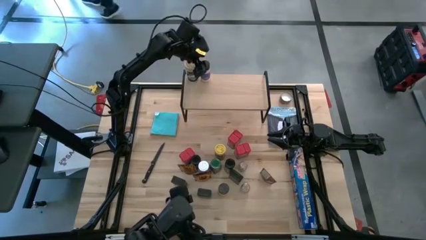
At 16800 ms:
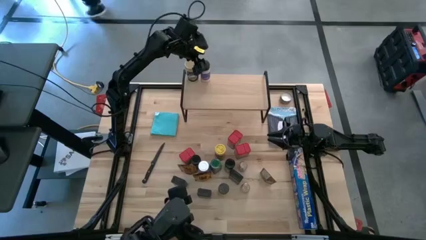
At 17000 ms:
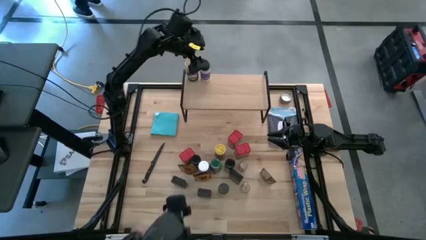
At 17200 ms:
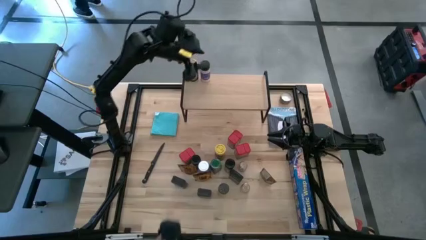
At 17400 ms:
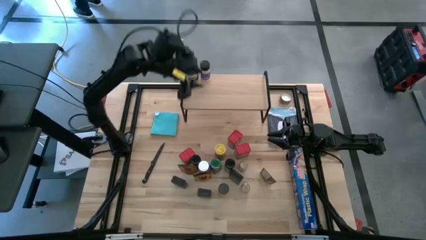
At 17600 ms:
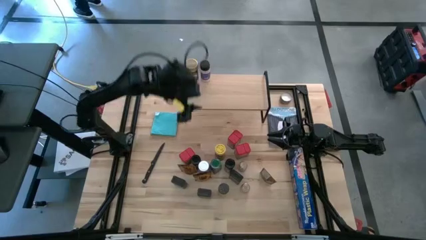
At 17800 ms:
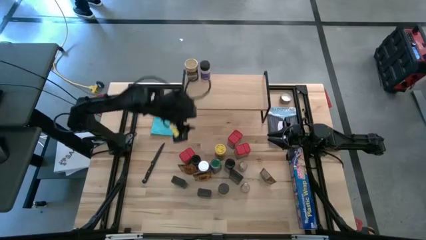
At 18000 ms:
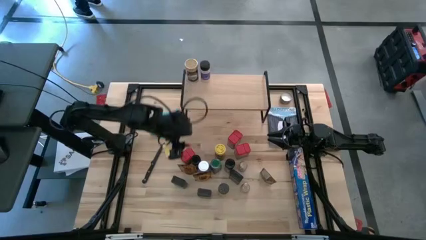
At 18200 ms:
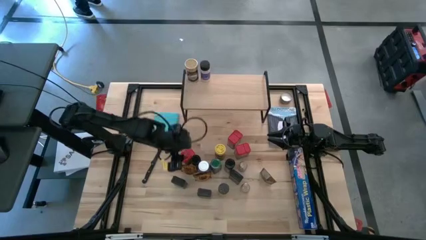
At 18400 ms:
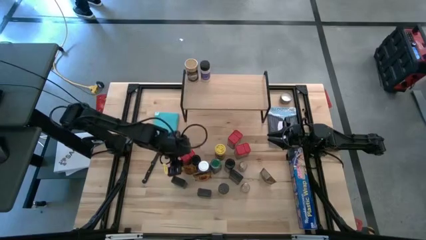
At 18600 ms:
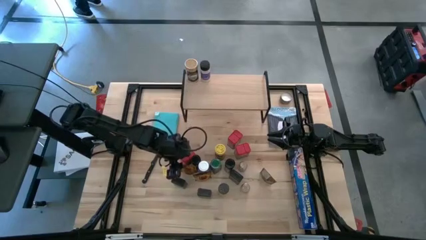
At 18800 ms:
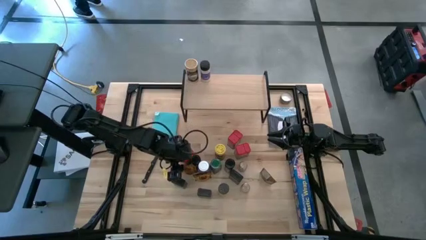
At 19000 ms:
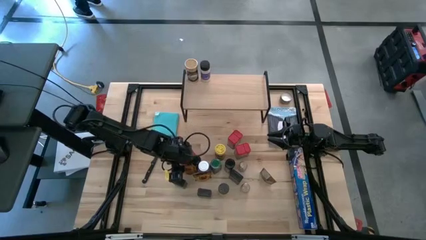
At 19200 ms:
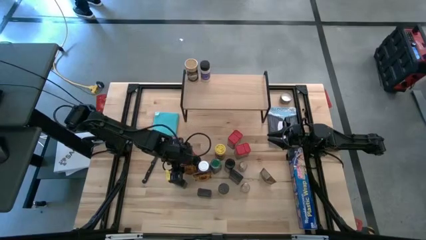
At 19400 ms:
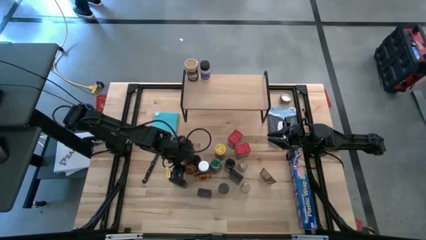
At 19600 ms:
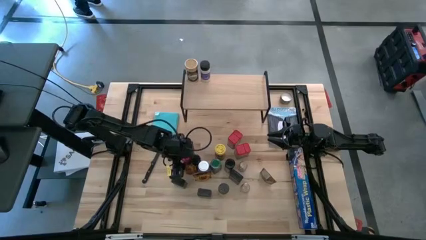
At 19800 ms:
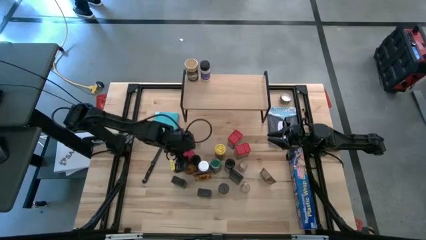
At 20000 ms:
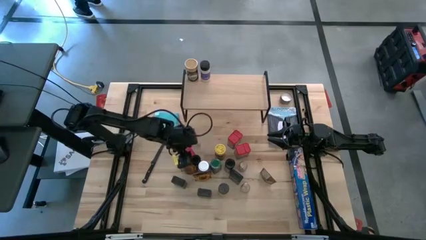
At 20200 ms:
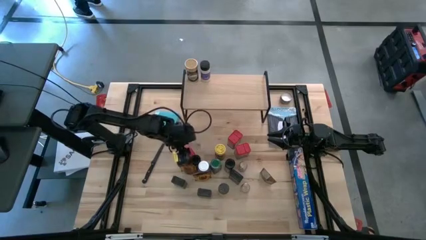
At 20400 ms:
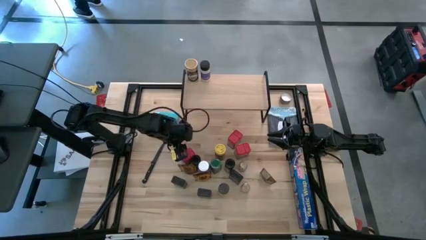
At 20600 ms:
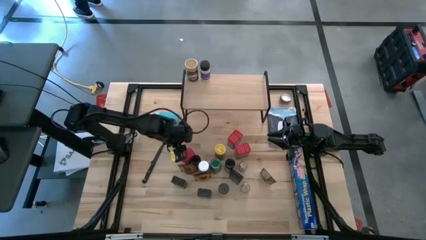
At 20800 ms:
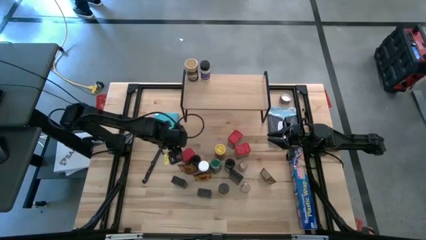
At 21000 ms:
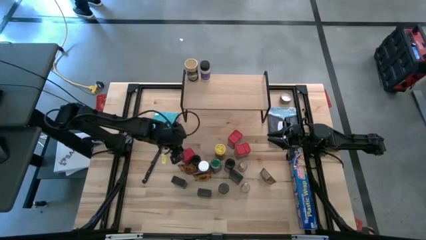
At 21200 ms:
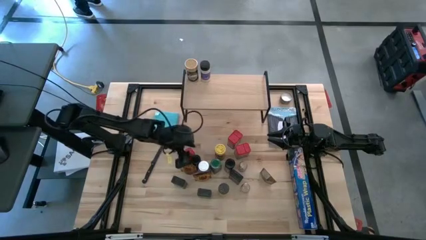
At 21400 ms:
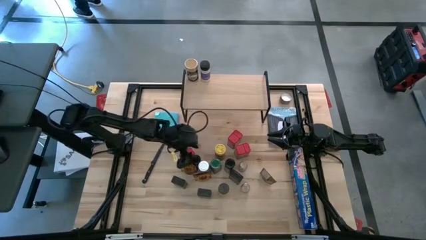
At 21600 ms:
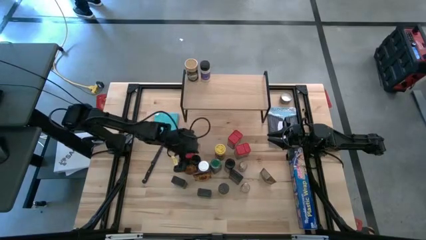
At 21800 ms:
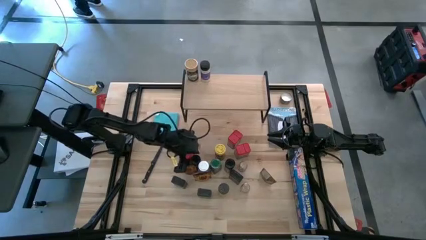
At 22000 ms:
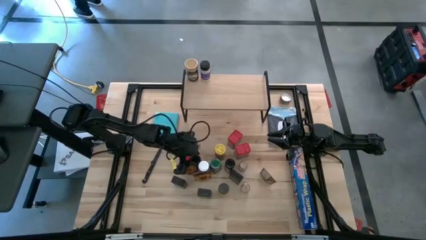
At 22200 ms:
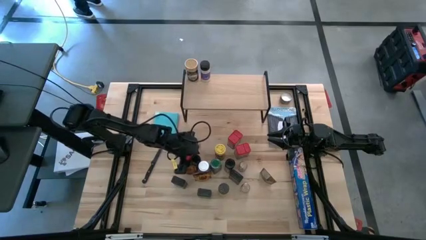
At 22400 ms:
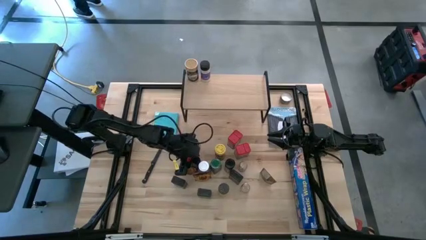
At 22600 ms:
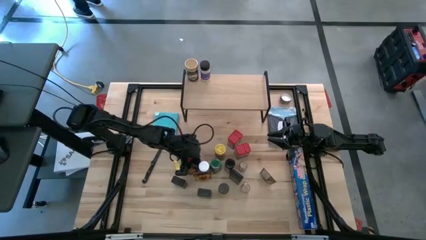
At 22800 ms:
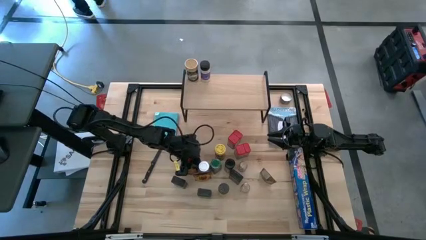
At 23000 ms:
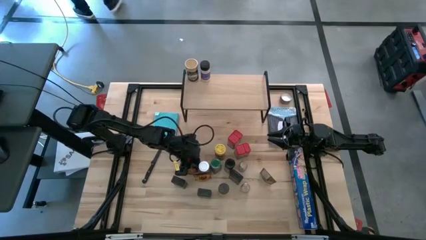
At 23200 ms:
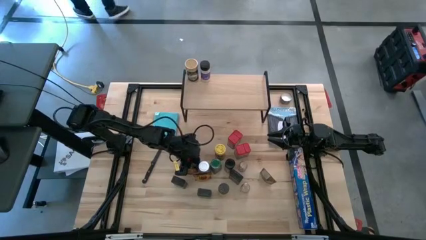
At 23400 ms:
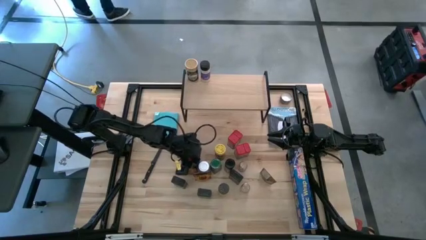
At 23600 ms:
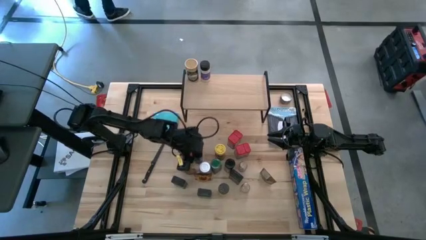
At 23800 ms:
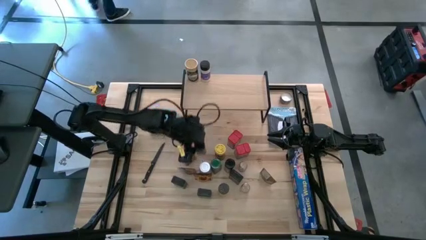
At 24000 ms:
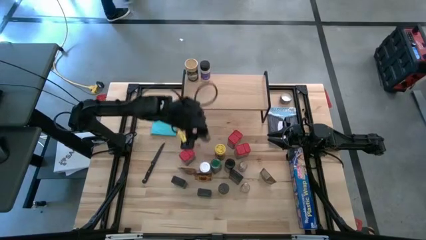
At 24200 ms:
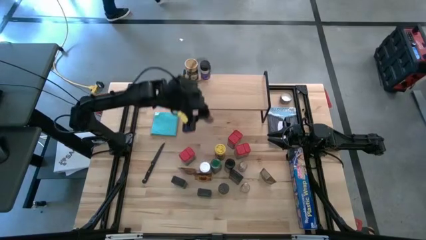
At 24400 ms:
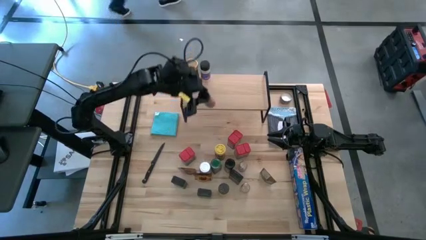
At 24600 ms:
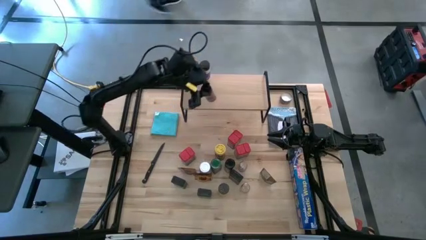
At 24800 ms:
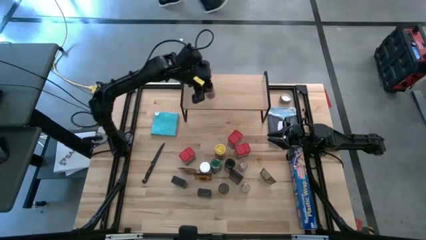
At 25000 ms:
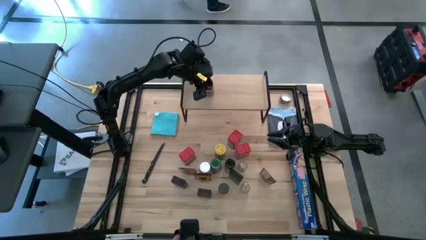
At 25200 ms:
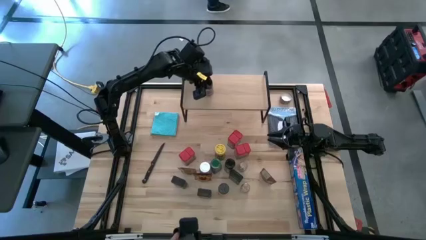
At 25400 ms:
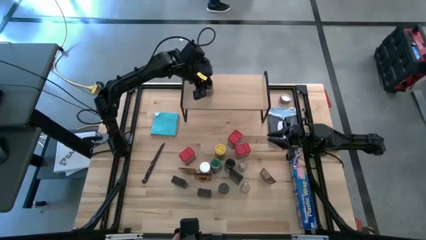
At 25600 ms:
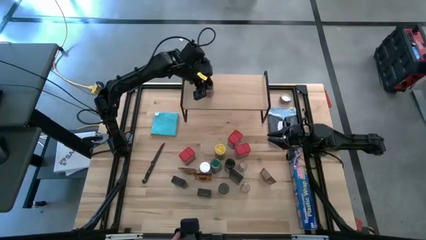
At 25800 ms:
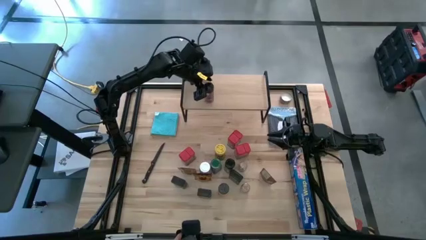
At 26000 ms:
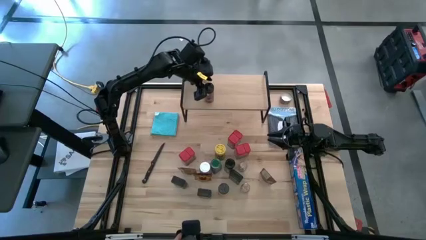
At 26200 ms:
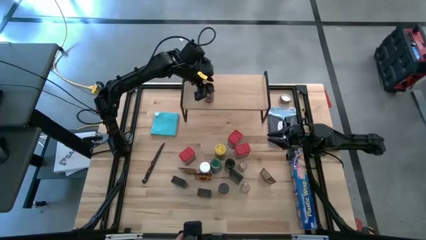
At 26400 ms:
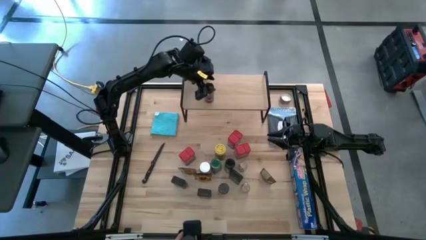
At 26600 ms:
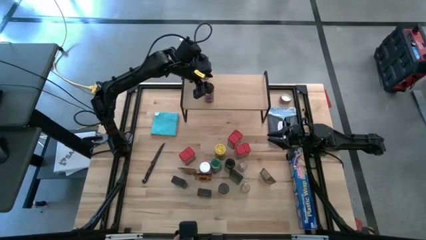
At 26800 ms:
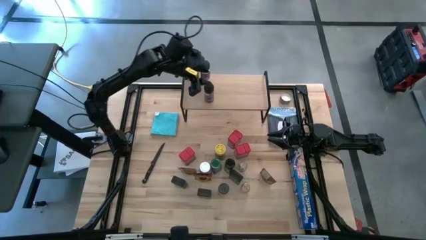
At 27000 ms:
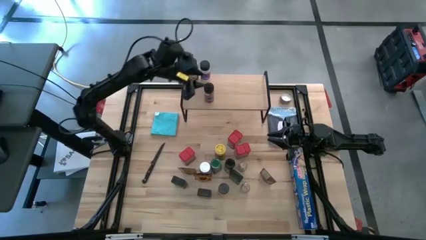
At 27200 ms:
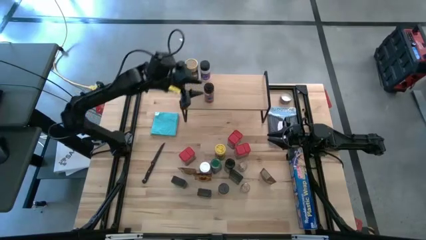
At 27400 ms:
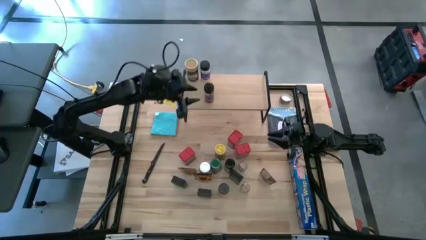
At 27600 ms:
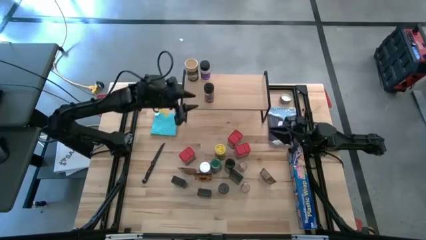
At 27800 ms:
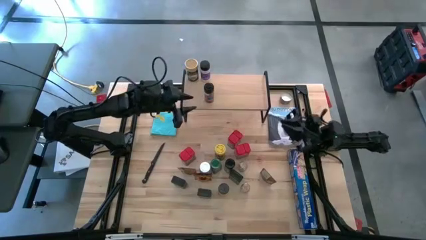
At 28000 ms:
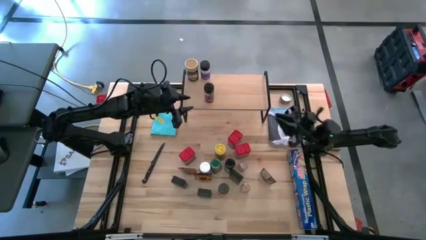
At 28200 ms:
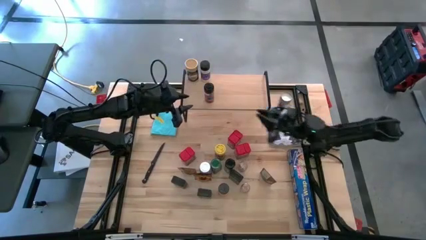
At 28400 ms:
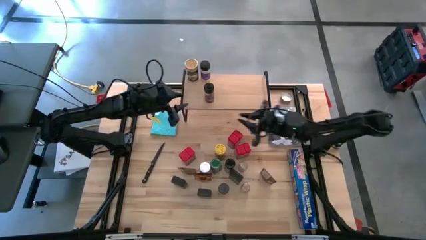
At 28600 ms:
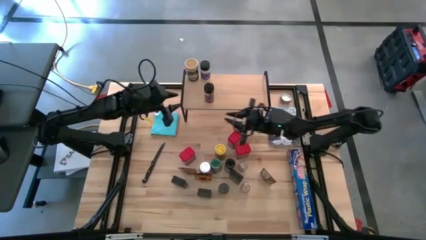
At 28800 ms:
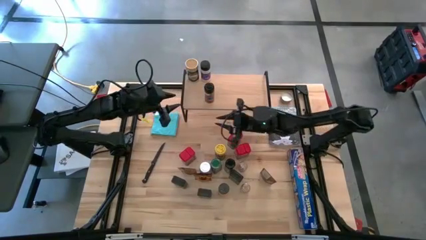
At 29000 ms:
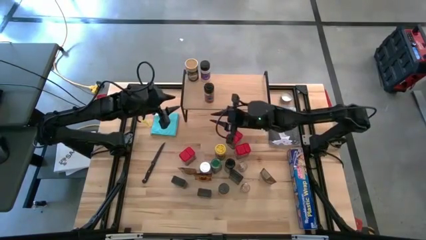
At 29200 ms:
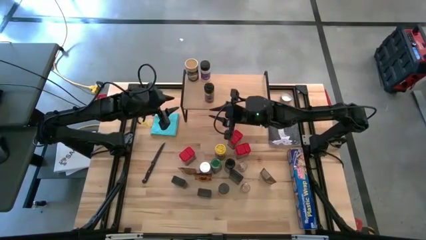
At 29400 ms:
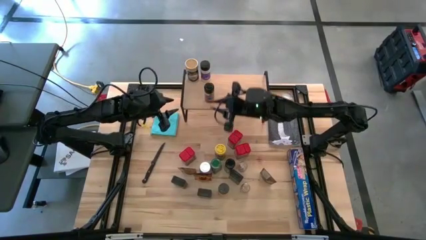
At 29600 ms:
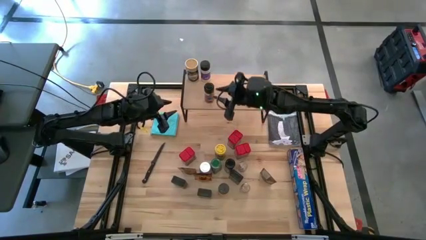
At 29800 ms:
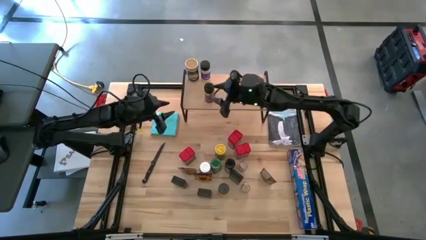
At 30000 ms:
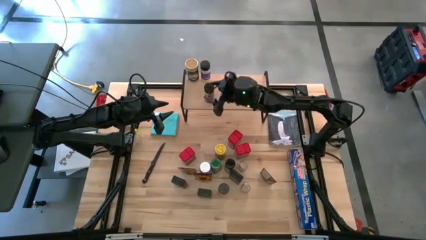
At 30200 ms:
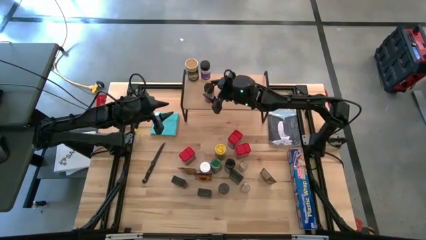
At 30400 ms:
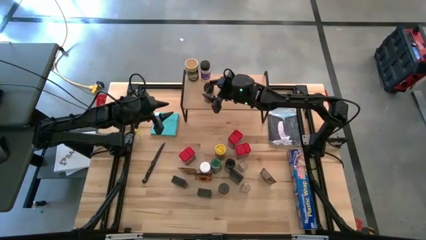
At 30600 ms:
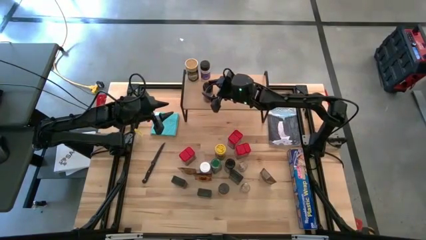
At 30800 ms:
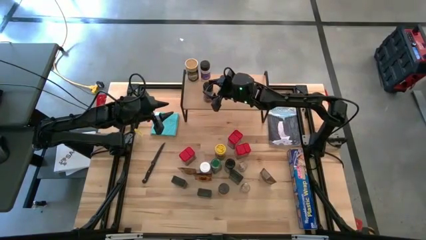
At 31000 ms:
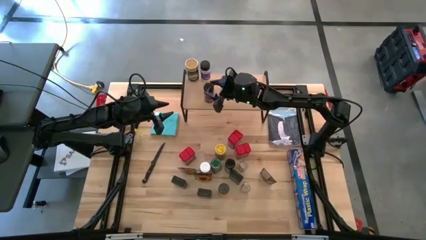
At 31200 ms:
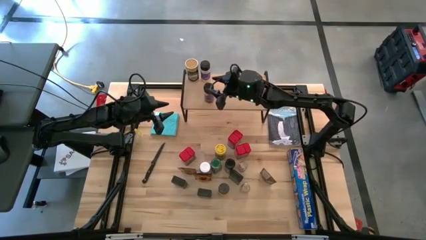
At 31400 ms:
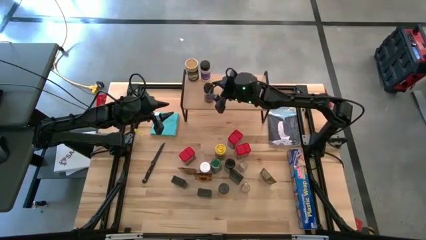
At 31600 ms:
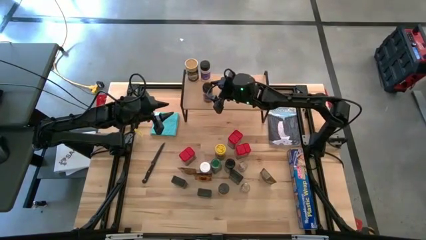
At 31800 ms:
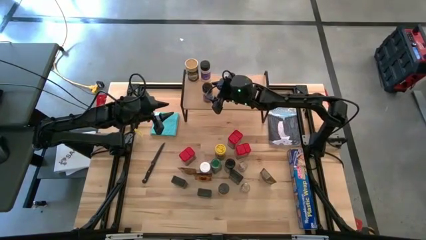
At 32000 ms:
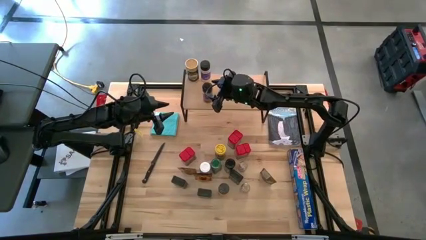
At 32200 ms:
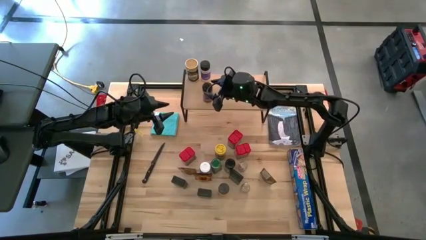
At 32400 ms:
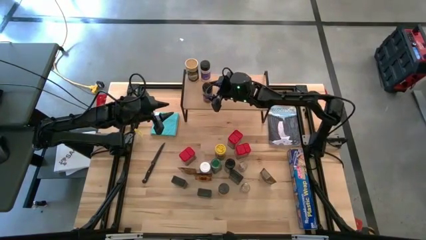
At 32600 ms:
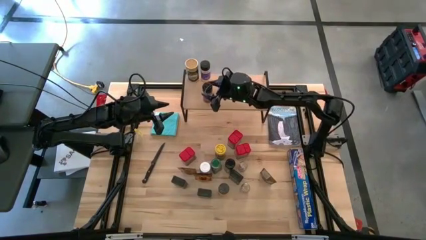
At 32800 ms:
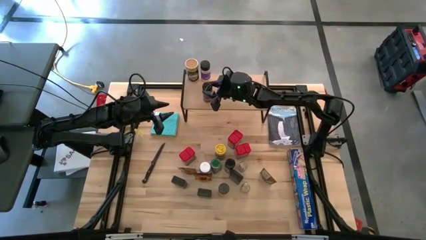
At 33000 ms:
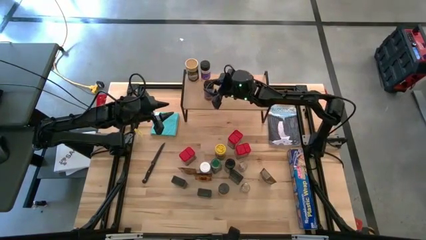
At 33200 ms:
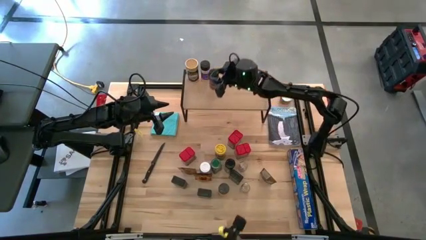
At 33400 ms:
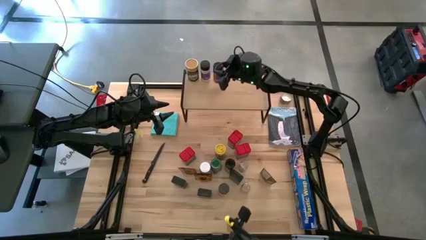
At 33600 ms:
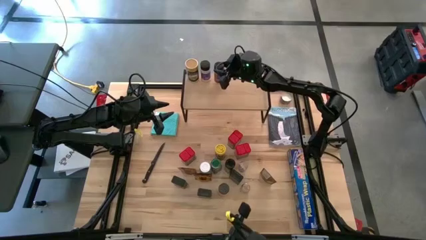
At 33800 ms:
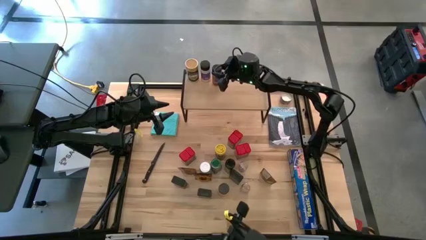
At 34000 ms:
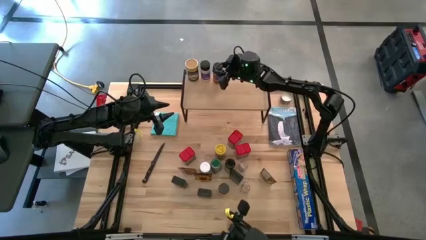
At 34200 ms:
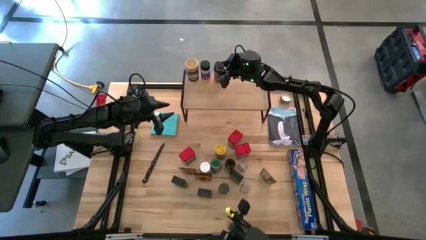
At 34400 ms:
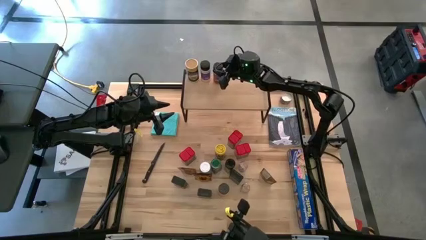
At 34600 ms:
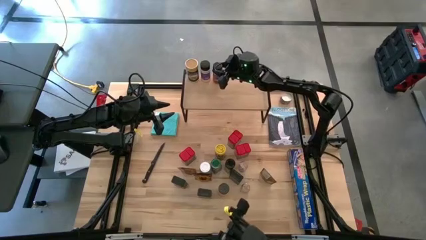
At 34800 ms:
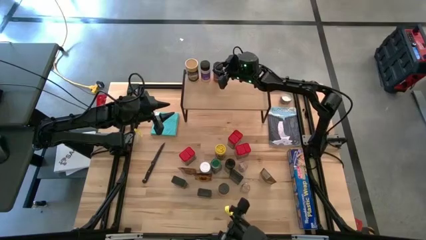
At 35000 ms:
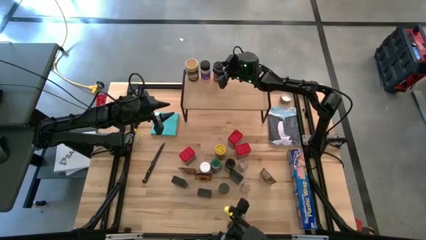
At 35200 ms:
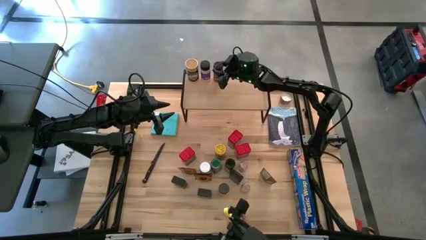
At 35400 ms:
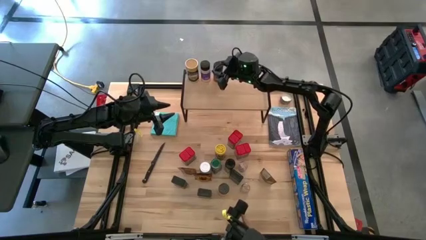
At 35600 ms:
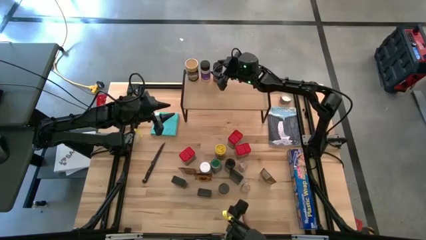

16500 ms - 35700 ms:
Task: Shelf spices
Put the black seasoning bottle on the shelf
